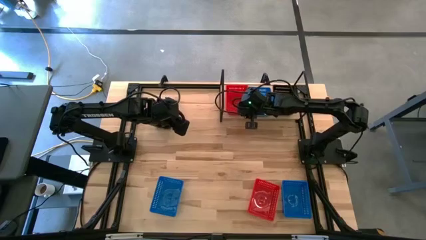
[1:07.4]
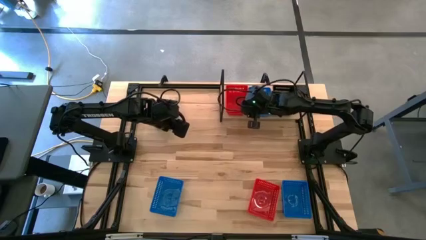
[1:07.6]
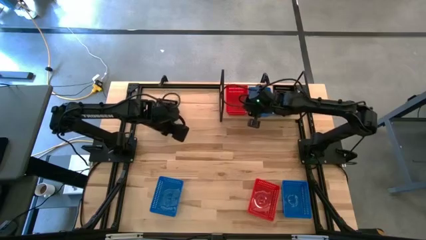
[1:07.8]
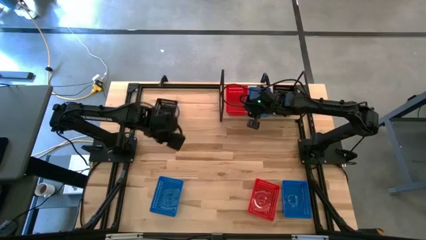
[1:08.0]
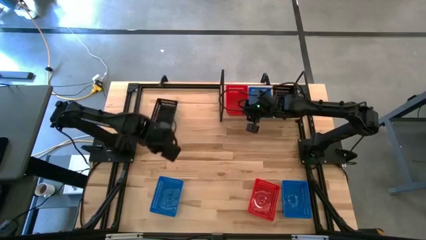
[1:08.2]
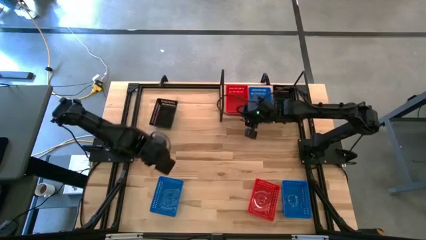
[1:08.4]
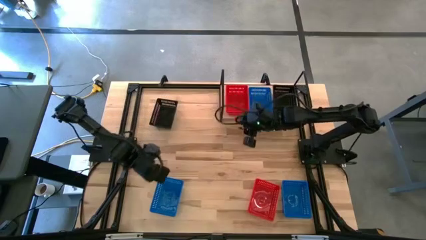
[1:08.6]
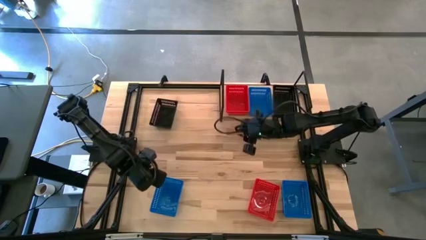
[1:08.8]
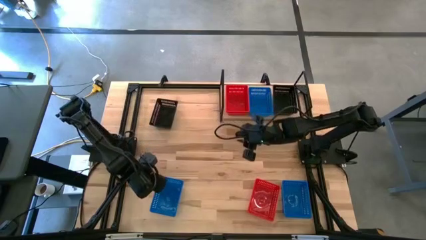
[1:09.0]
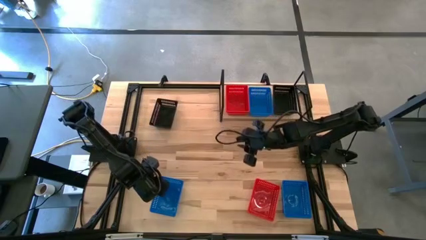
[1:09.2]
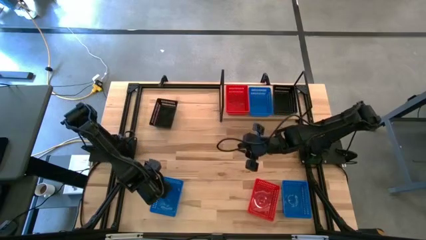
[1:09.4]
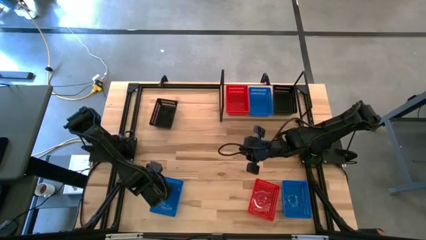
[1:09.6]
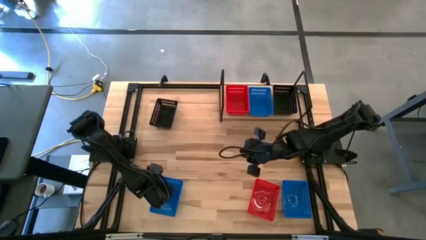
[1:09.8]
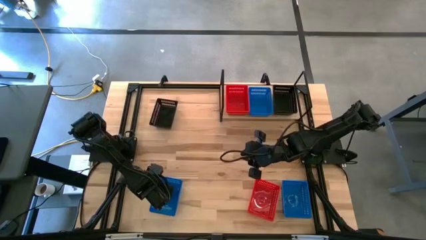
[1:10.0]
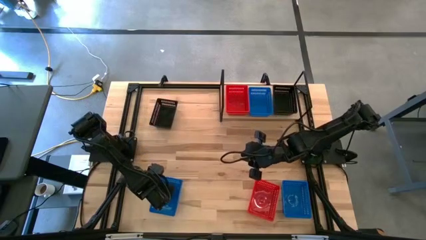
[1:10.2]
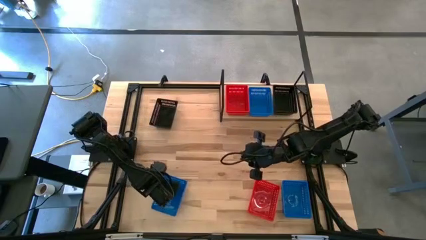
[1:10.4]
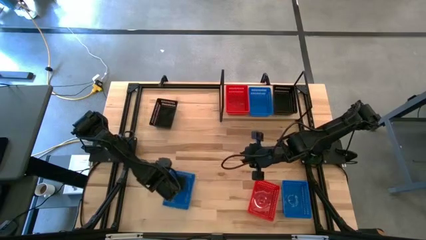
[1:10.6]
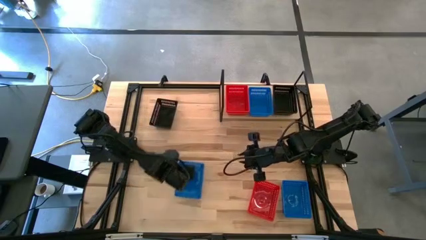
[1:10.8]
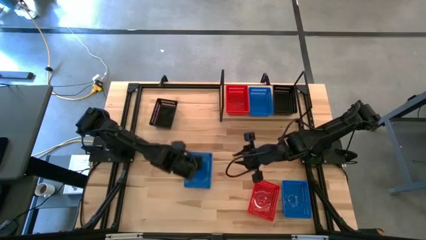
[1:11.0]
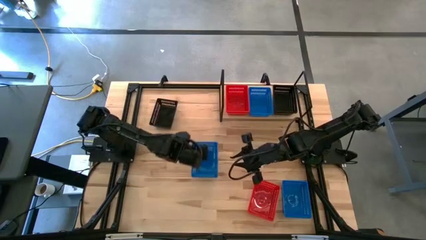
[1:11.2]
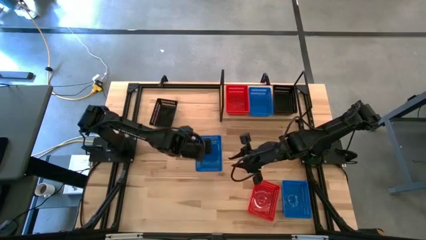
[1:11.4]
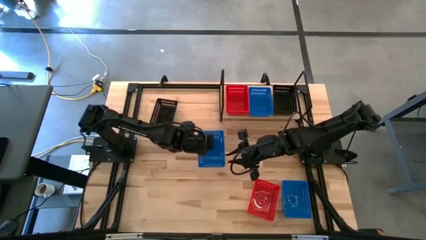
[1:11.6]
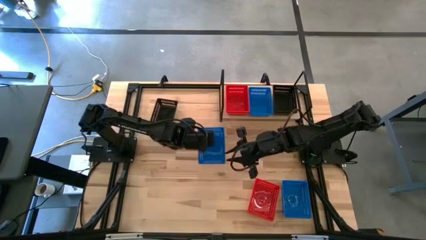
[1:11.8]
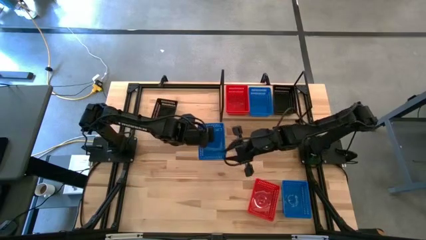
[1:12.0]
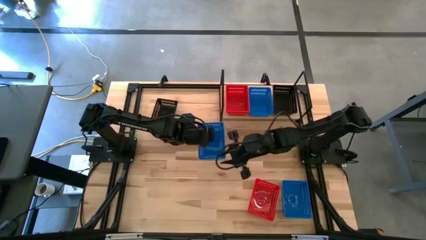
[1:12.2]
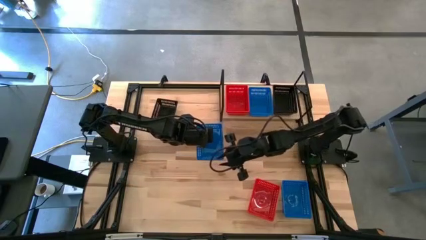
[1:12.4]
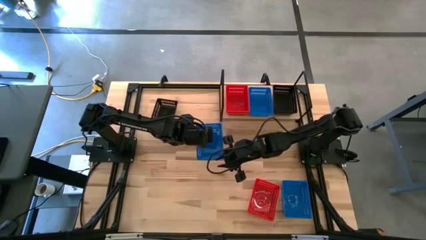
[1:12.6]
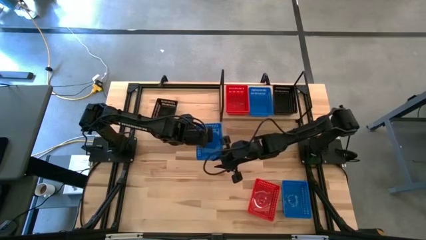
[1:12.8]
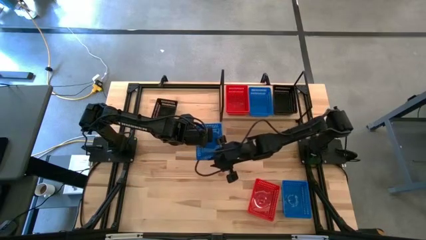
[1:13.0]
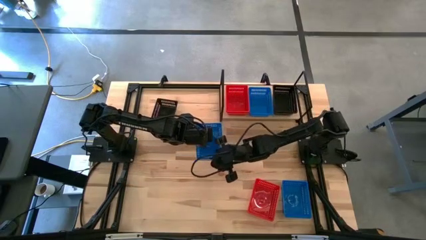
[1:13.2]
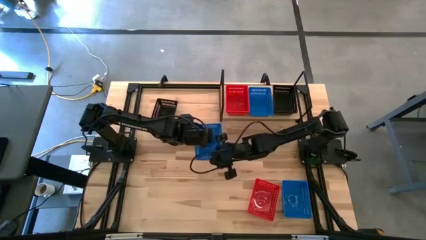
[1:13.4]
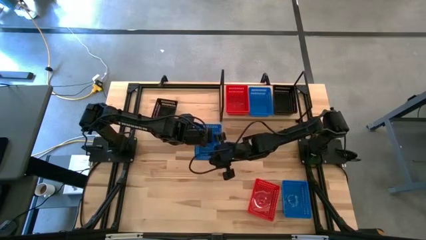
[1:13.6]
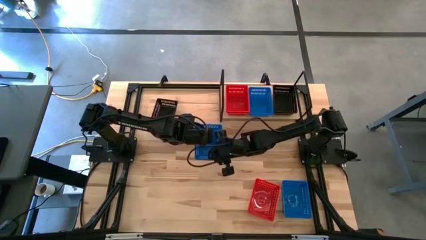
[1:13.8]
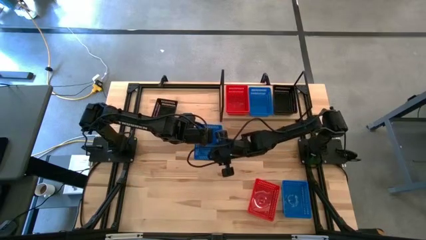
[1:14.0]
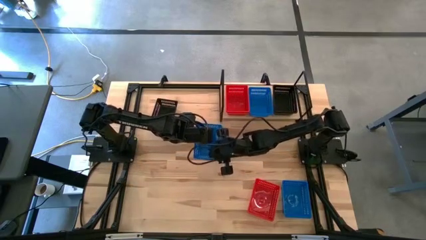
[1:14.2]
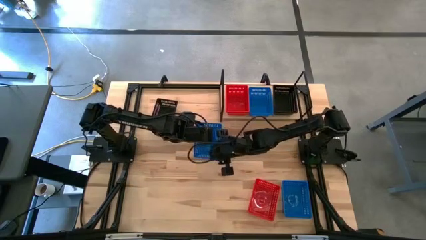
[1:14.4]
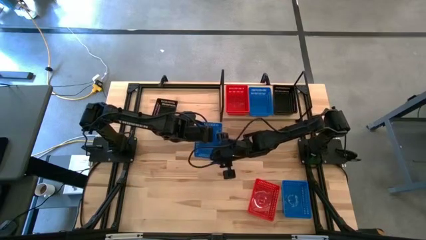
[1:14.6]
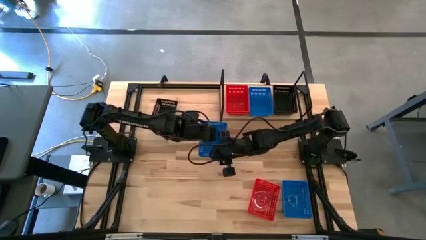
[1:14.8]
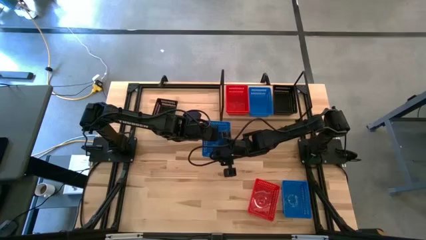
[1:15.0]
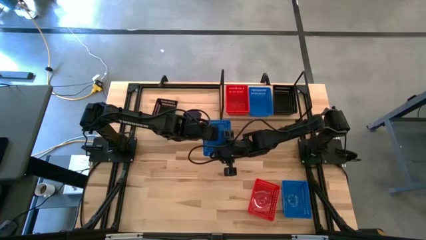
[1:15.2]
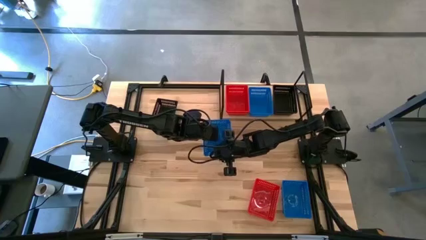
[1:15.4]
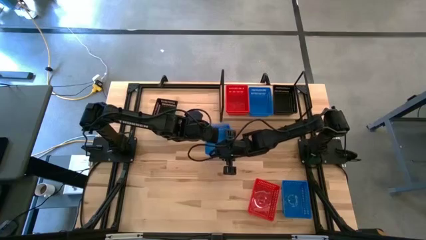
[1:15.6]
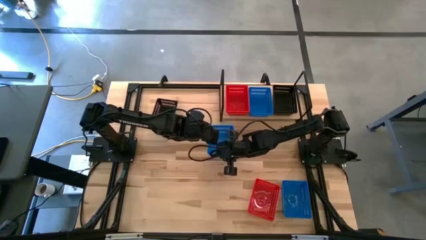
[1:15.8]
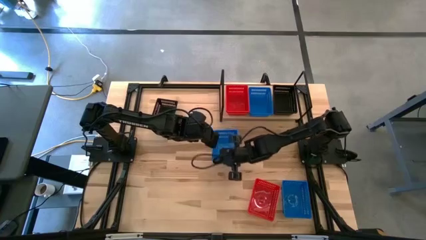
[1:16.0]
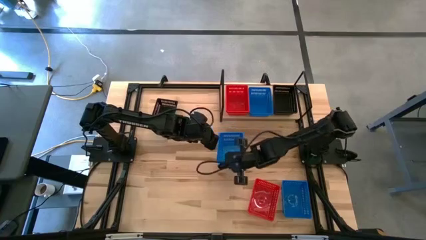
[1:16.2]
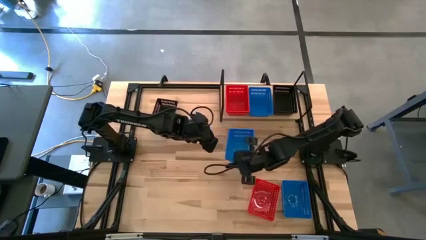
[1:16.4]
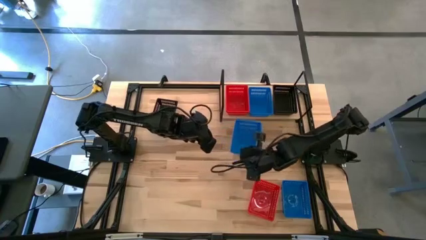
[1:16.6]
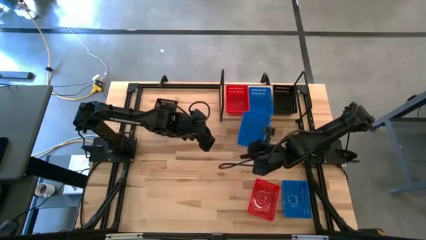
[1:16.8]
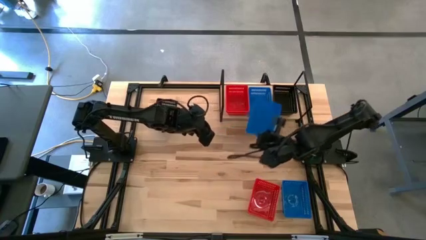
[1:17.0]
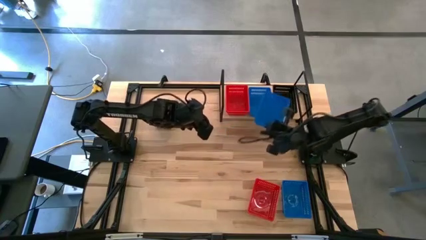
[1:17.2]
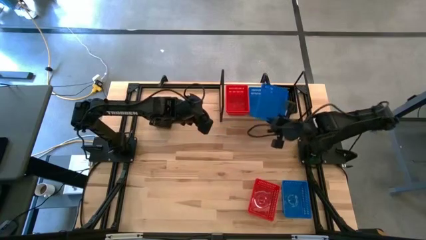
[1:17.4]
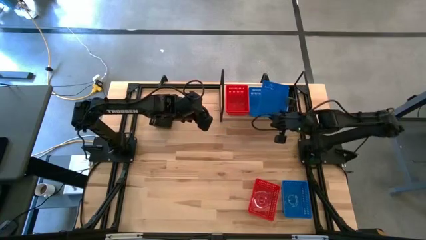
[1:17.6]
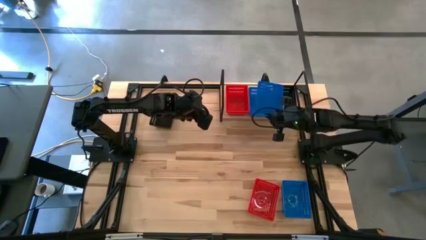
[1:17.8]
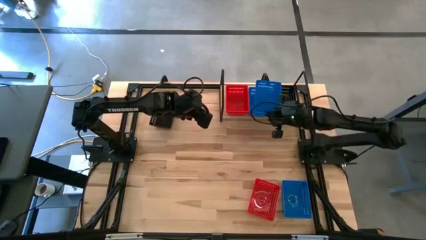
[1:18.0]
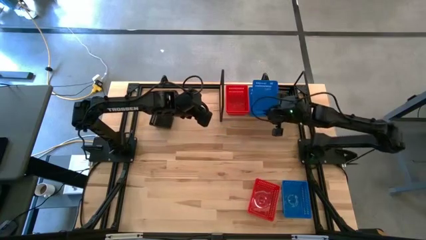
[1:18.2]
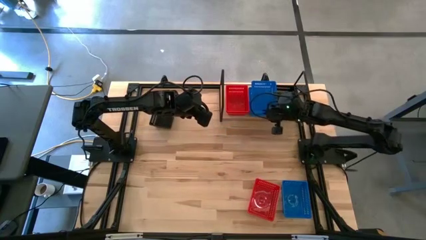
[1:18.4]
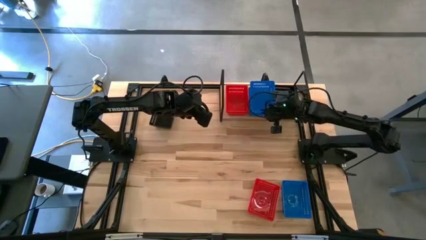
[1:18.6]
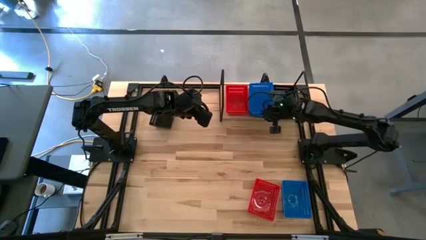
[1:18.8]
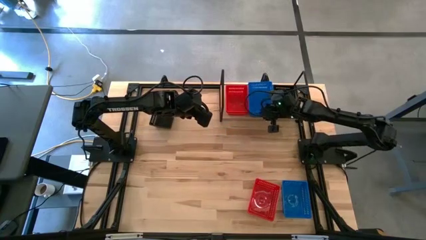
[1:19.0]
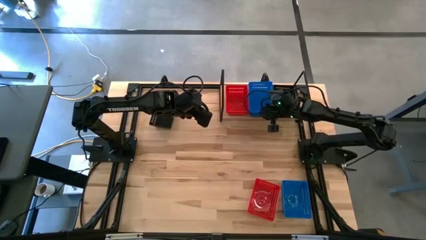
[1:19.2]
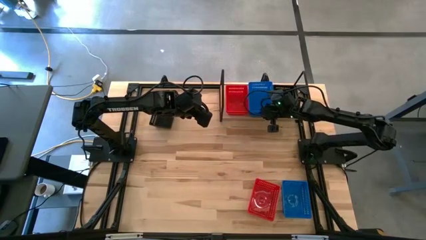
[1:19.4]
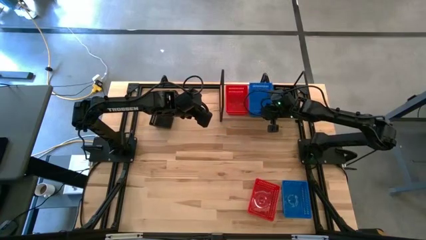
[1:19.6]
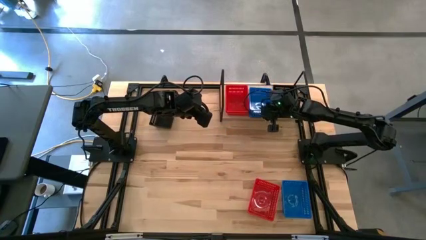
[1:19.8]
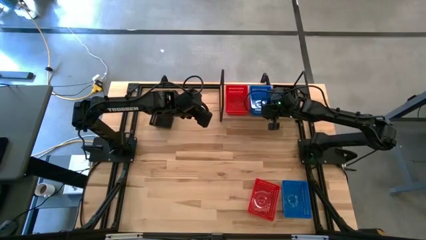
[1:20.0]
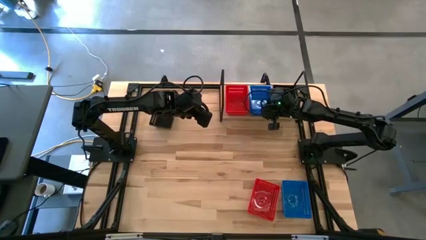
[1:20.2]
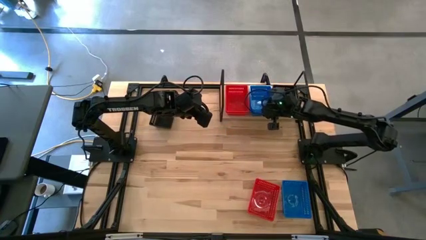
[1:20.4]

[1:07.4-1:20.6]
Task: Stack baskets on shelf by color
Stack the left blue bin on top of the blue bin on the shelf
